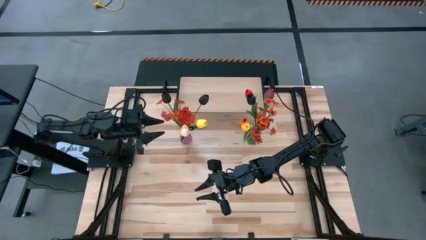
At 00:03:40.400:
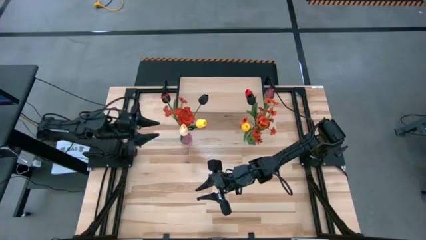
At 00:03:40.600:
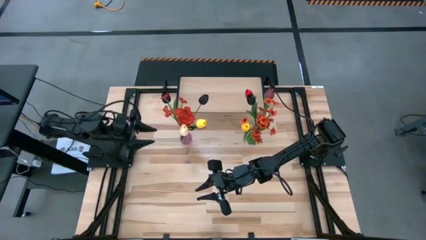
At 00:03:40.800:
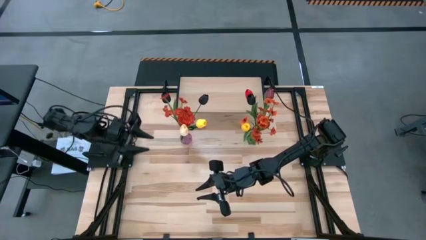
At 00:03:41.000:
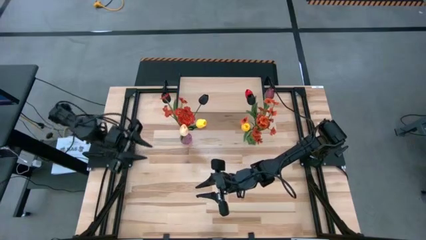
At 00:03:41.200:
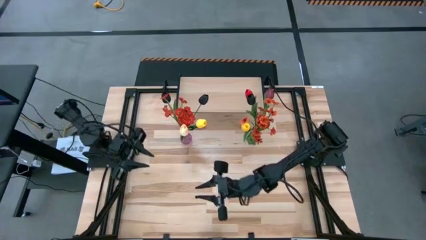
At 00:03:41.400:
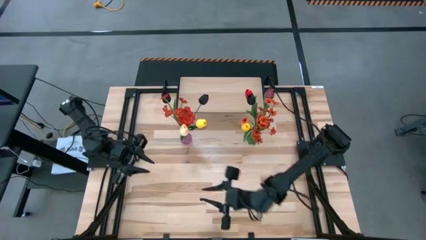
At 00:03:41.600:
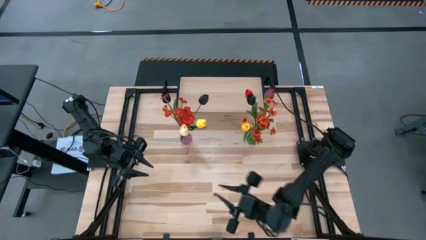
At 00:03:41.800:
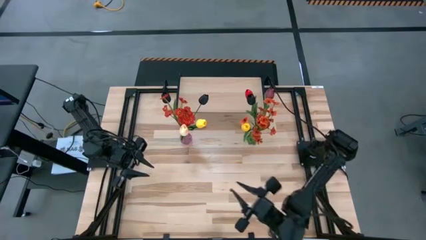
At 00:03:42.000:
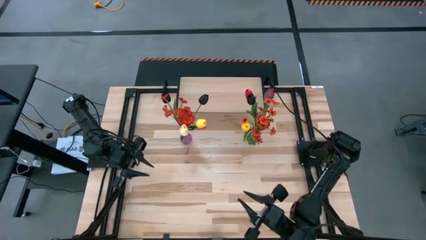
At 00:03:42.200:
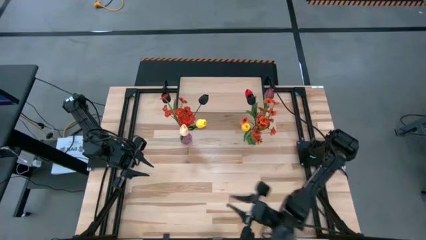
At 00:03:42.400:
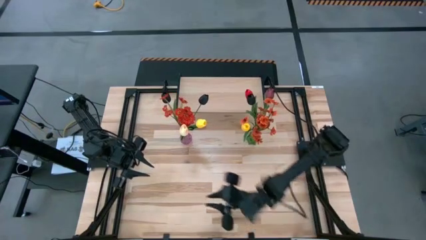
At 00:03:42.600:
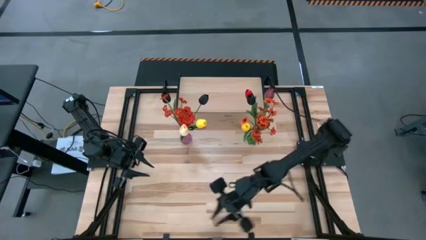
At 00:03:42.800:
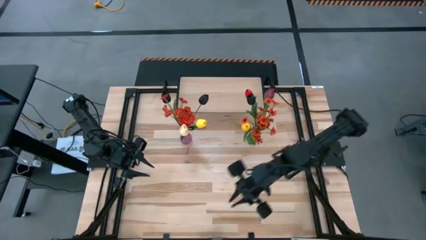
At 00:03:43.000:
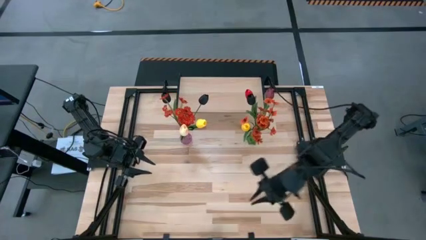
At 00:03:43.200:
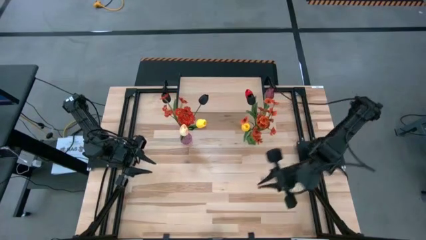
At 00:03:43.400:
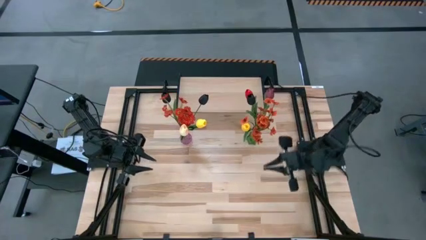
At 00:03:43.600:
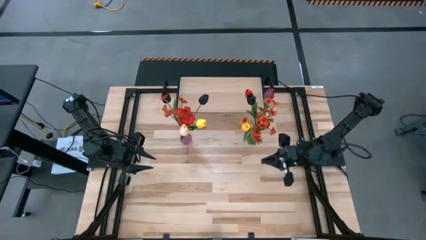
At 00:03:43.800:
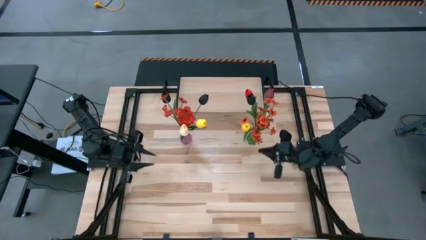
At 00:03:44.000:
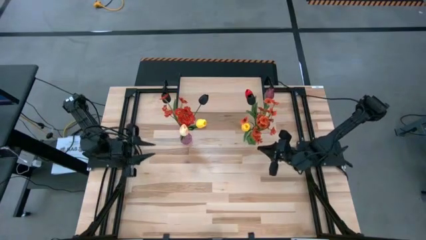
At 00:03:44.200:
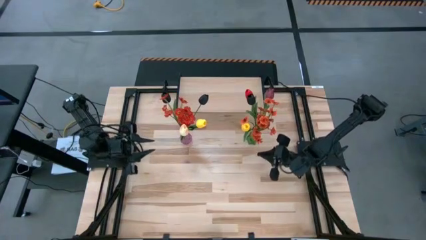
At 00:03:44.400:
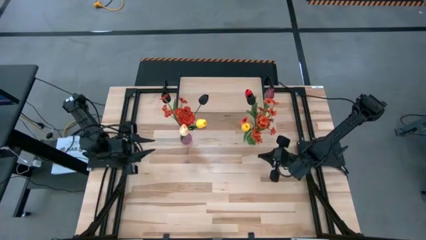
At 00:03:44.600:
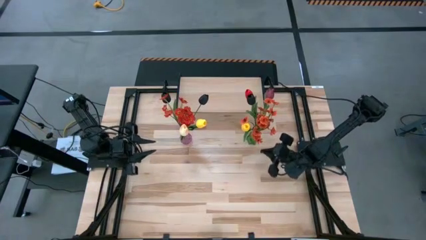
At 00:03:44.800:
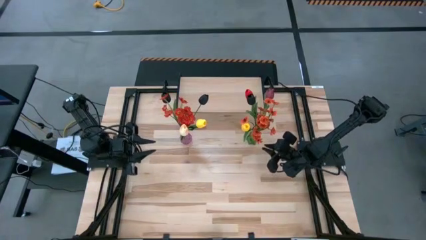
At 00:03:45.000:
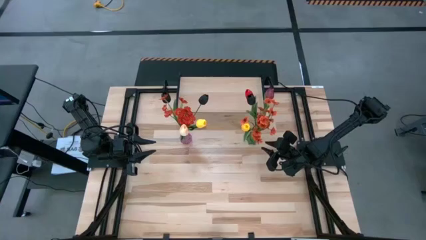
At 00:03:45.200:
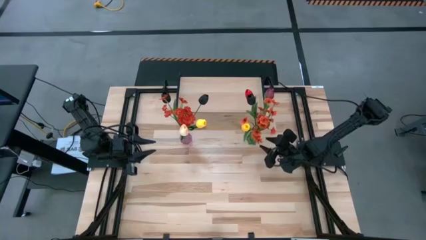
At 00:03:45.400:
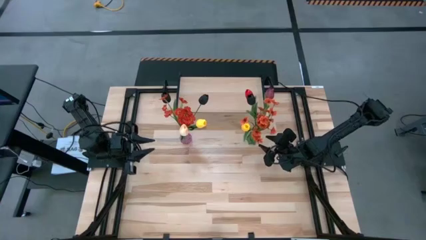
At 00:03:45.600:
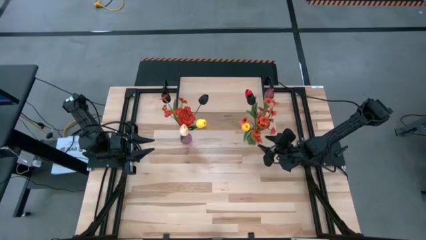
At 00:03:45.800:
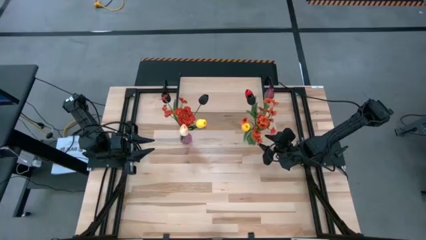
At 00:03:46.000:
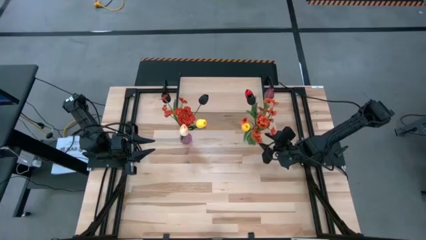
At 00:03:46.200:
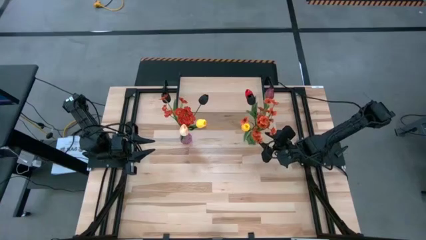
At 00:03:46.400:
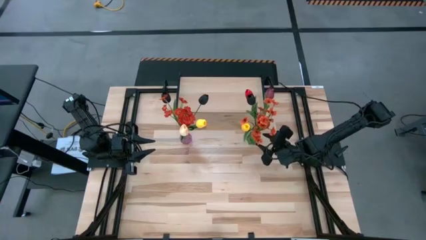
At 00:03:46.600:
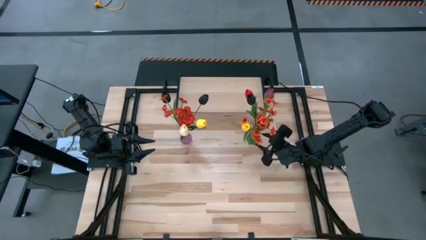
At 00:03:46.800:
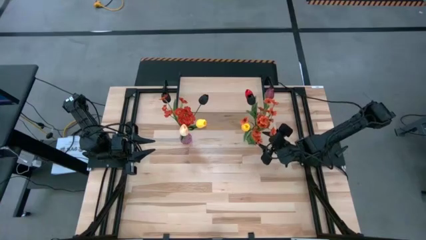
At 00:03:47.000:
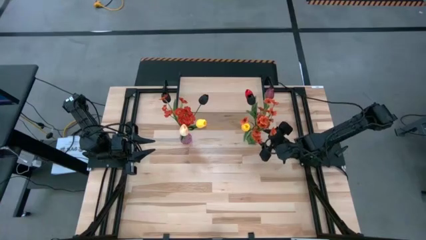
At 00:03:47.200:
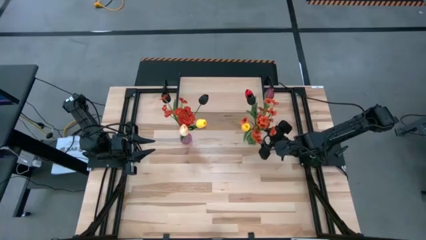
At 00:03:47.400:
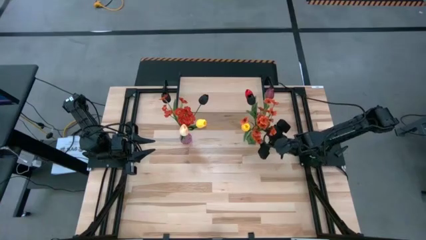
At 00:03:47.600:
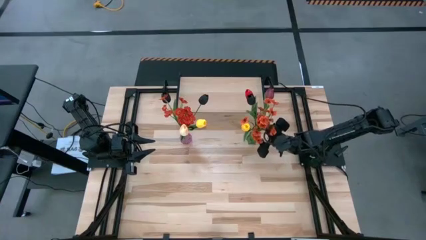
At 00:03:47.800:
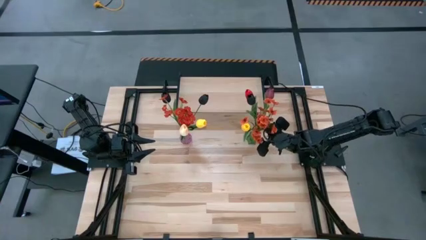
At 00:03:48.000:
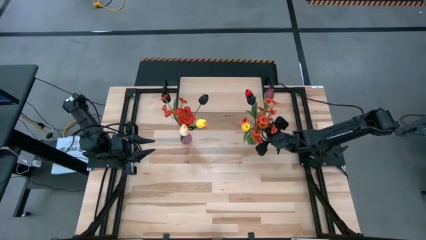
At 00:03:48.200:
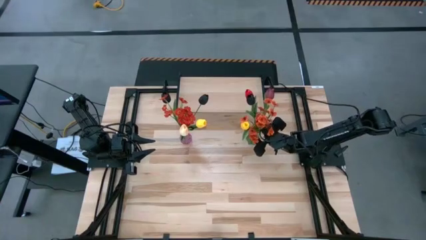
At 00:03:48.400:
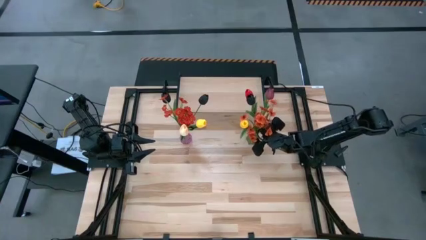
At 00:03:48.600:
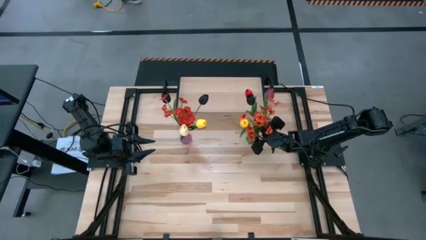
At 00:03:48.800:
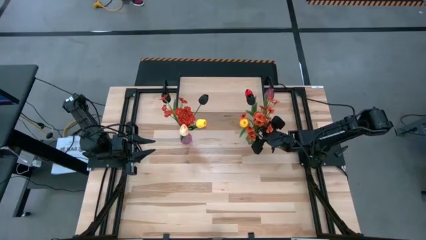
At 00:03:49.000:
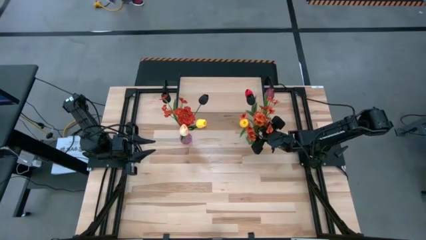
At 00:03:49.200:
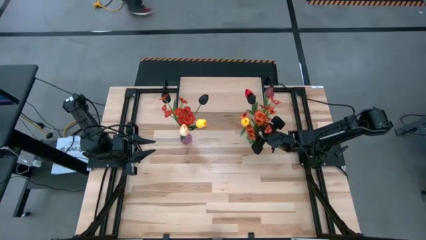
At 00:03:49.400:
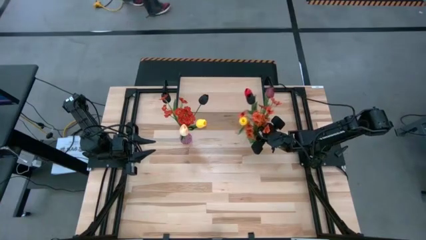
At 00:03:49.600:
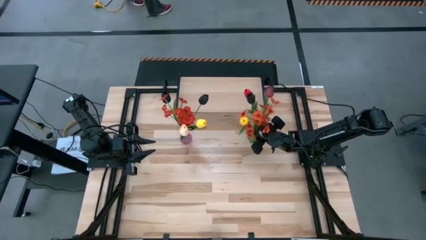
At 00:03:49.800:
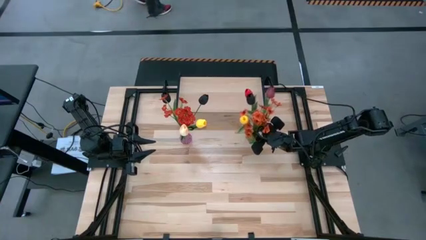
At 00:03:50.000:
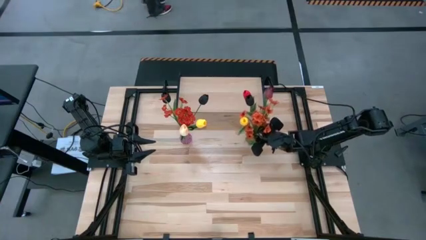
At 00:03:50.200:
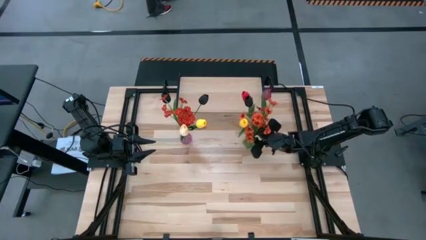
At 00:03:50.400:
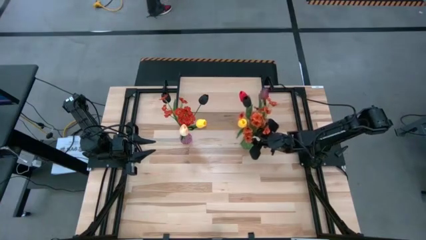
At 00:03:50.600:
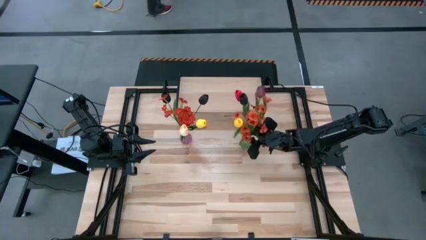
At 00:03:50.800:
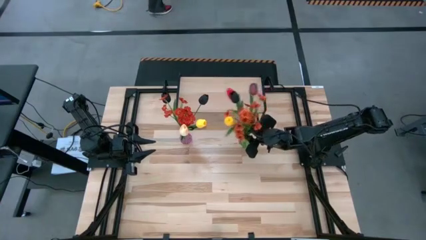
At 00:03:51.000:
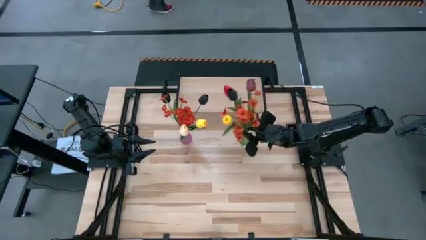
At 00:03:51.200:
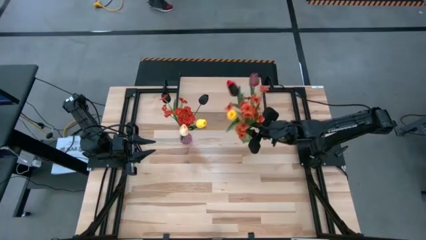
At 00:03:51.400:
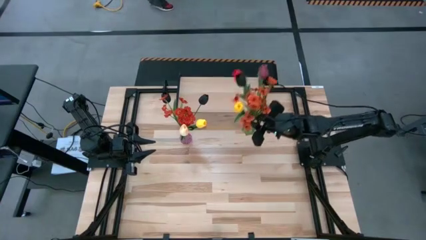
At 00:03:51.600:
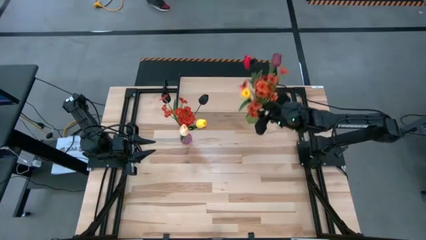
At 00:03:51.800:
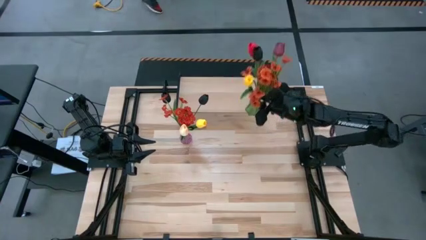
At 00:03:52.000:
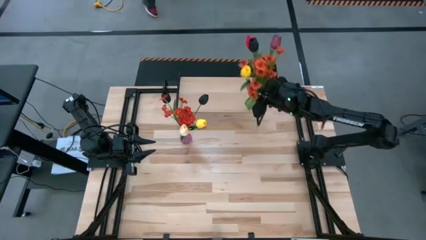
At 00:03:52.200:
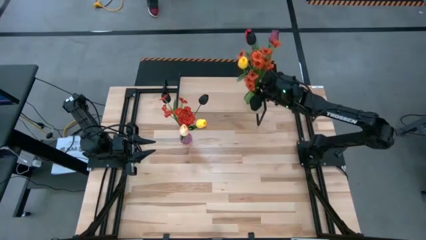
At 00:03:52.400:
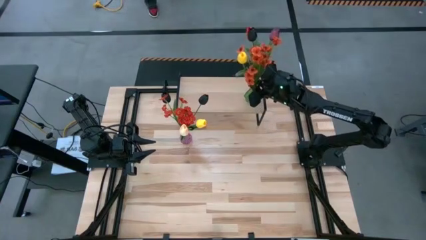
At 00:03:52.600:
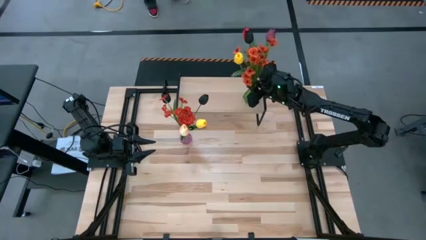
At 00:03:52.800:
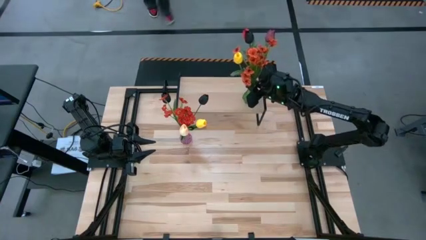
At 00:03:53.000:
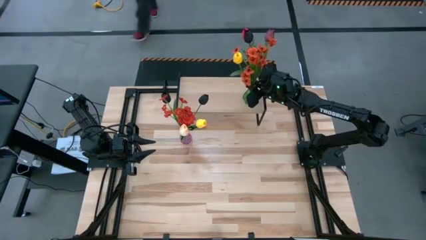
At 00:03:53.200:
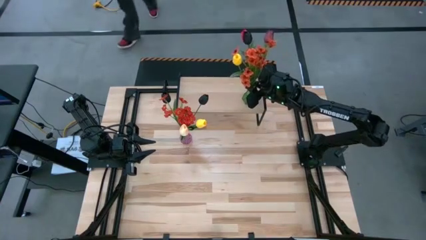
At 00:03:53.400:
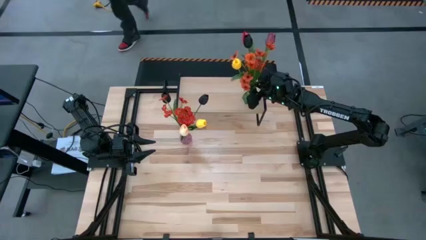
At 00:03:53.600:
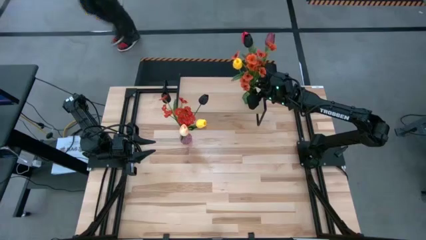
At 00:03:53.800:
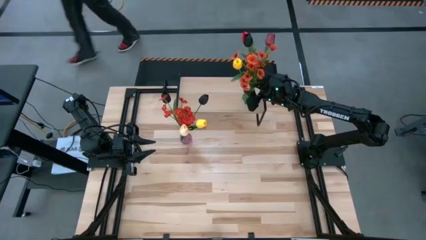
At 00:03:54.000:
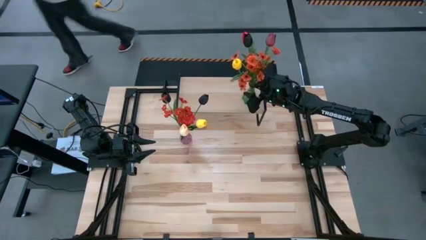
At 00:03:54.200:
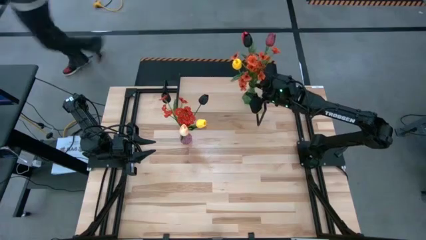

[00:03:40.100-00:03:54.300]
Task: Pick and place flowers into a vace then onto a shelf
Put the green vase on the shelf
